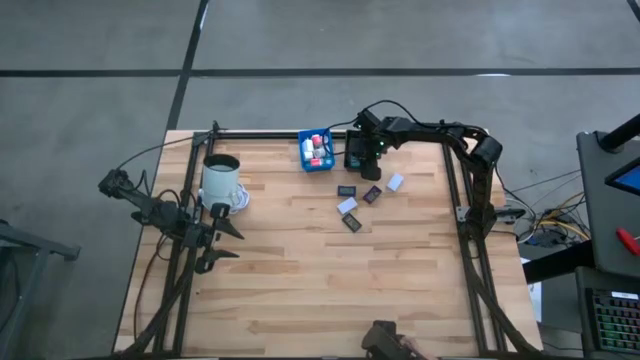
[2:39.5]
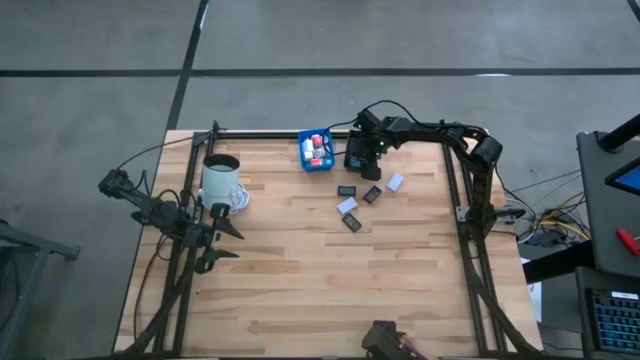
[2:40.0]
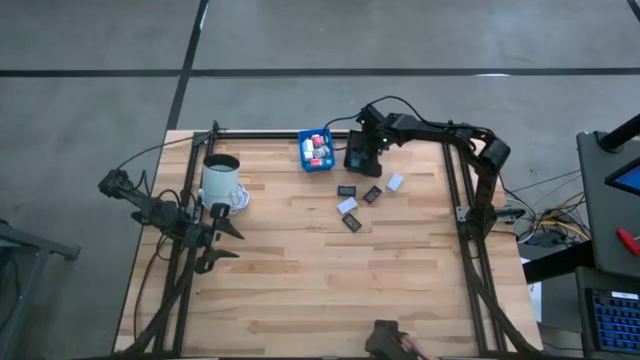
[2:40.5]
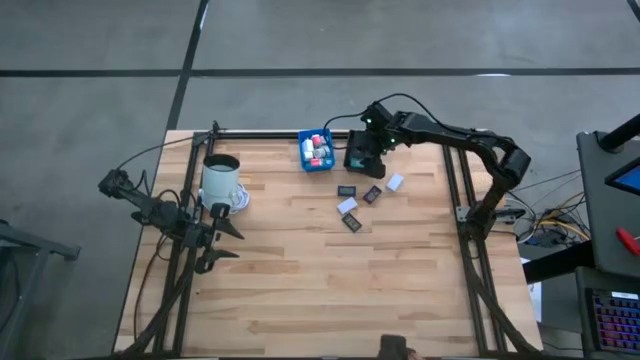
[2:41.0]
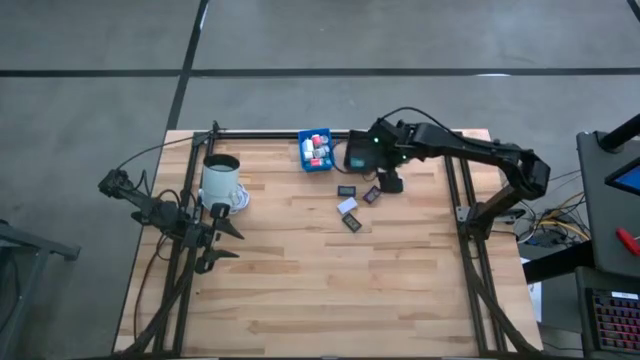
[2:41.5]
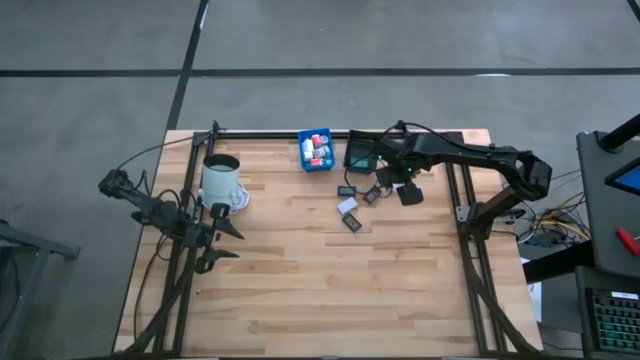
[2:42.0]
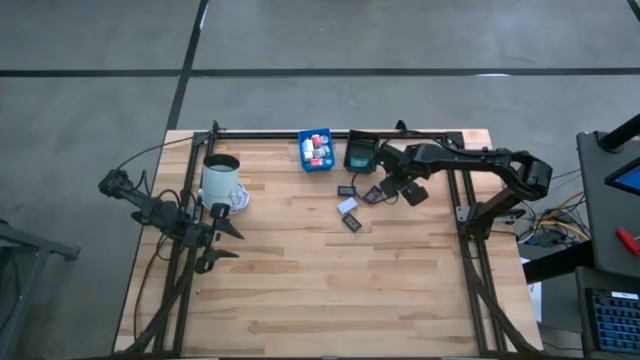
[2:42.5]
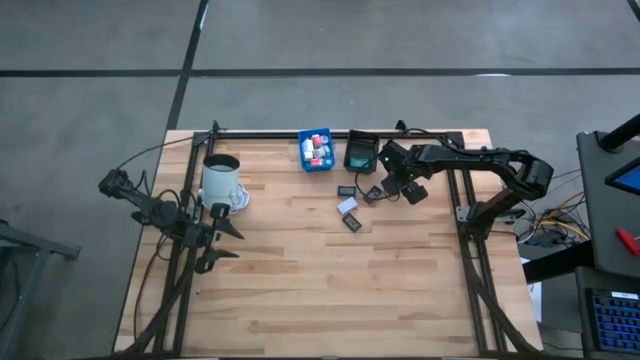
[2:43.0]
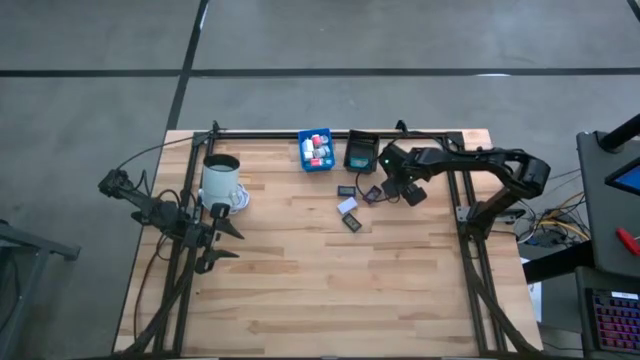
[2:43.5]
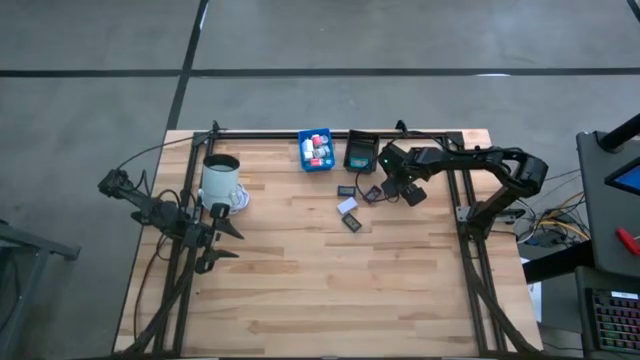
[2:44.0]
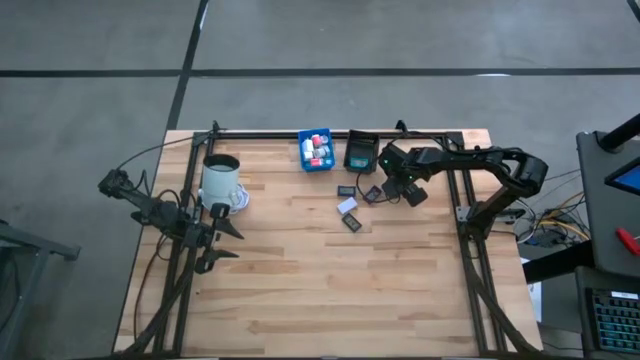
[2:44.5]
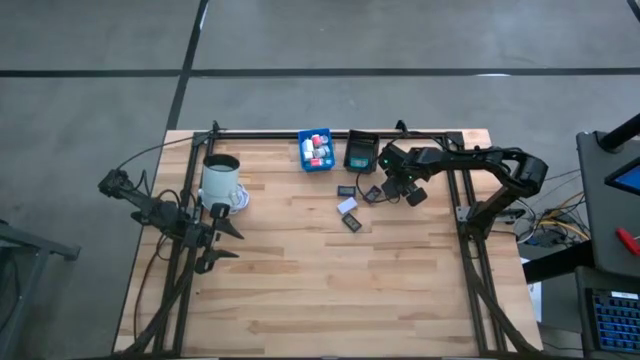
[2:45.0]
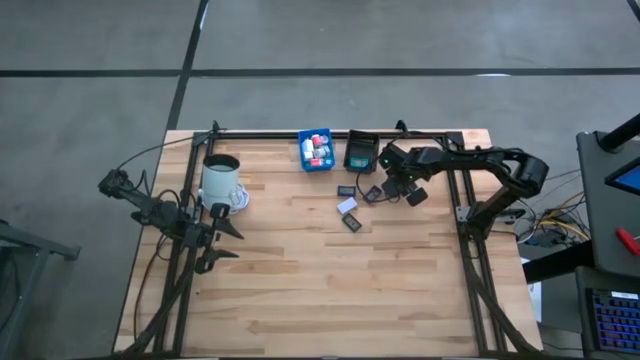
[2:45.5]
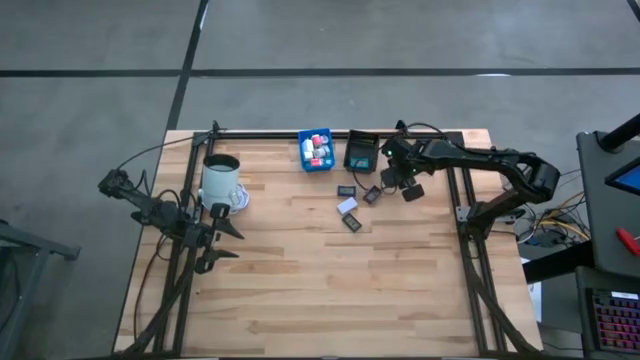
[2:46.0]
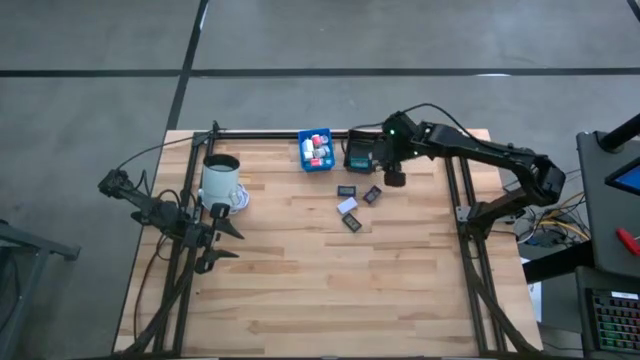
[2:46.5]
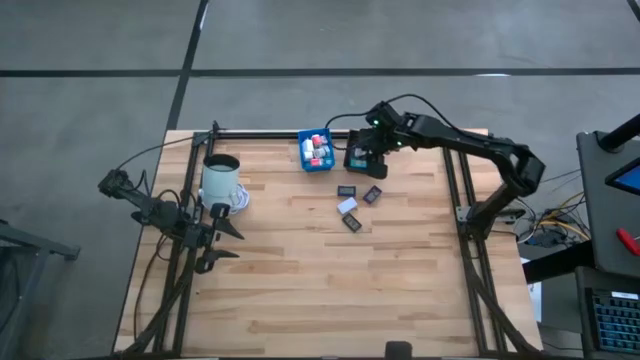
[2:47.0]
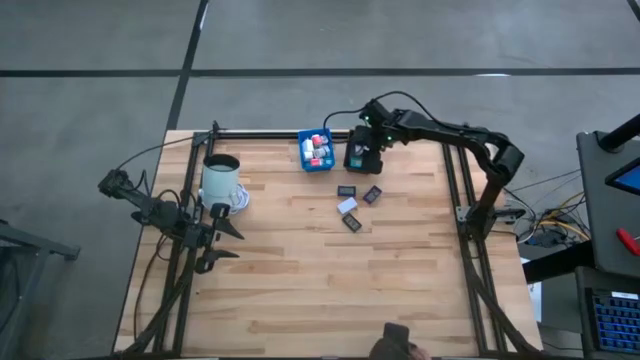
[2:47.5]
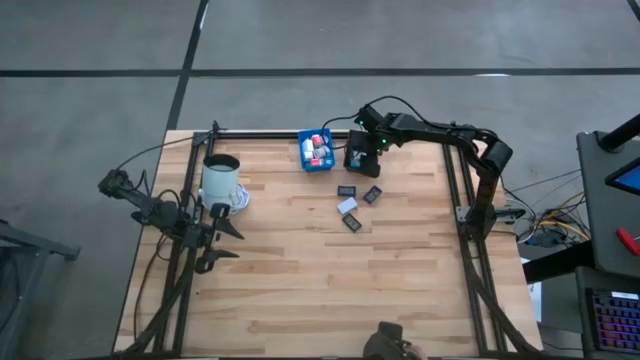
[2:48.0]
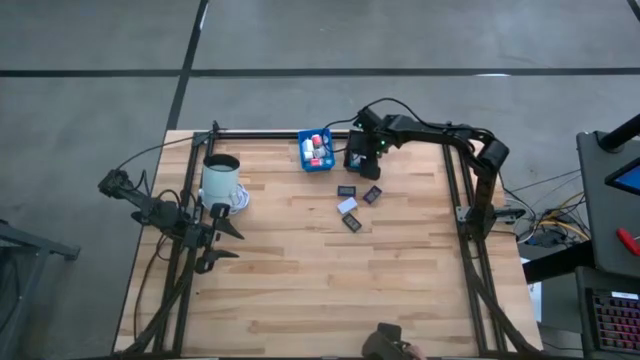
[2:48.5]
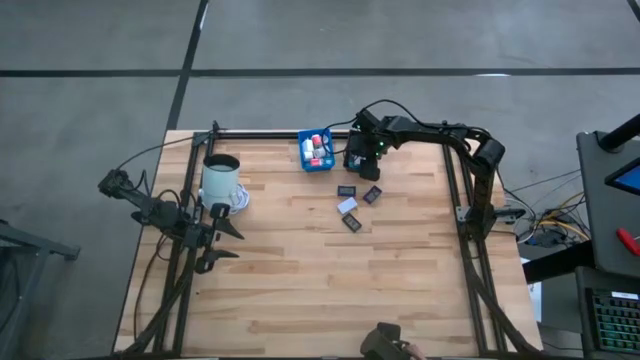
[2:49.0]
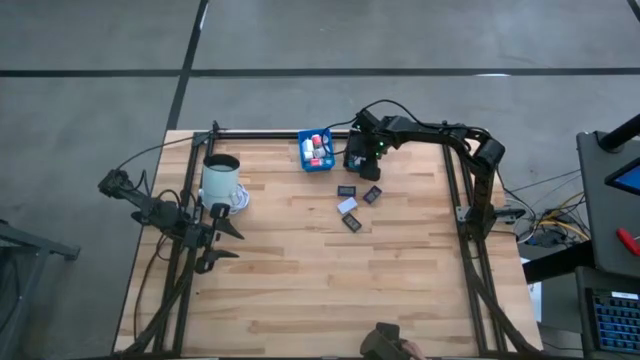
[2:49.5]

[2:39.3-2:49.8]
Task: Pick & Place Office items
Put the right white digital clock into the black basket

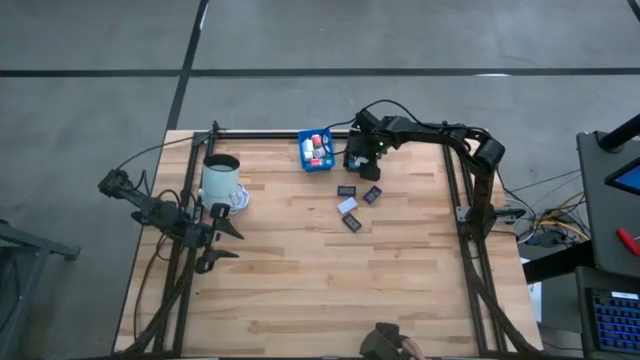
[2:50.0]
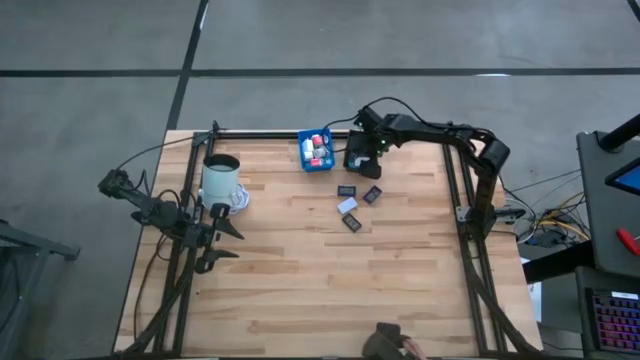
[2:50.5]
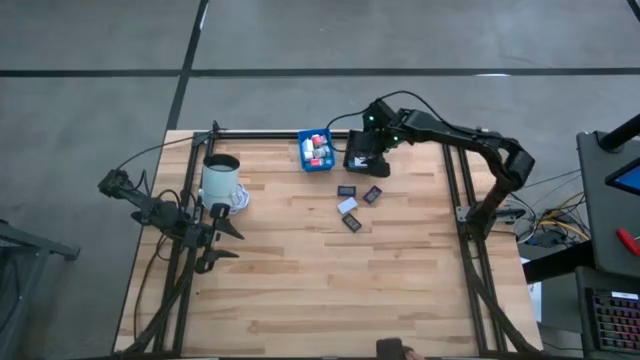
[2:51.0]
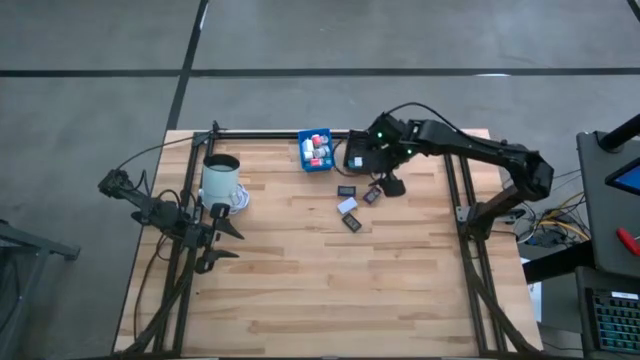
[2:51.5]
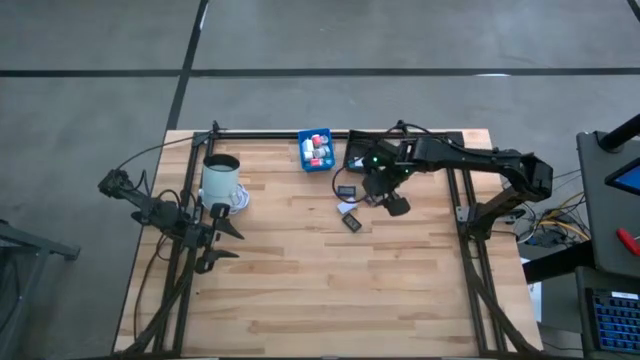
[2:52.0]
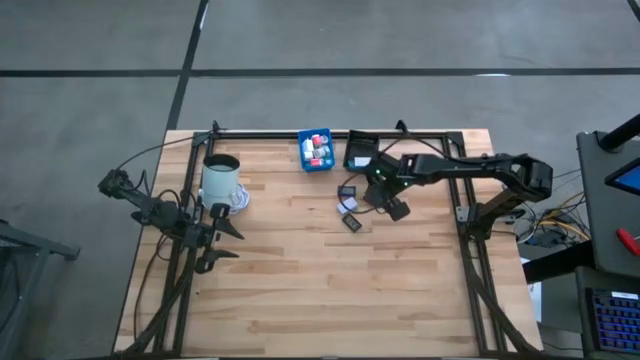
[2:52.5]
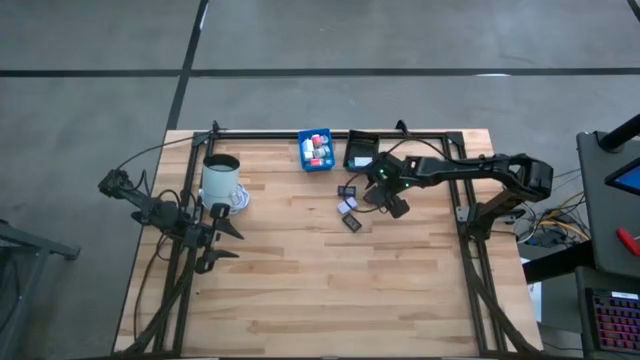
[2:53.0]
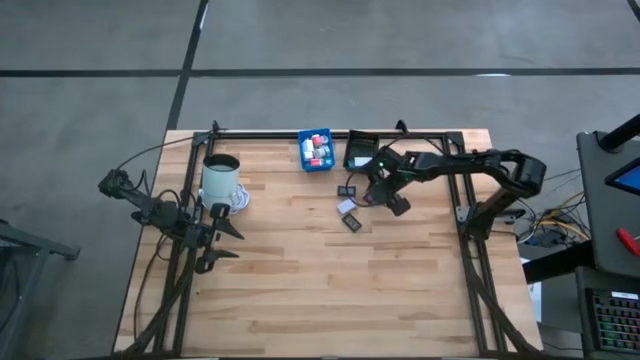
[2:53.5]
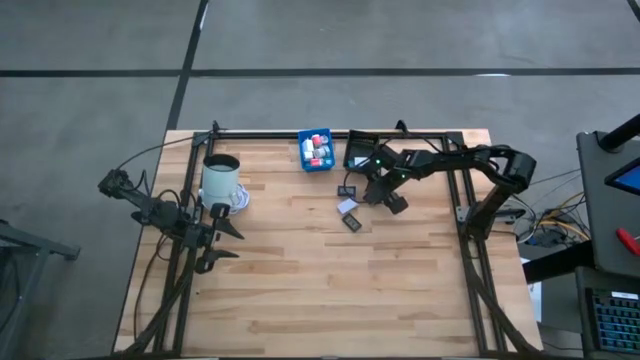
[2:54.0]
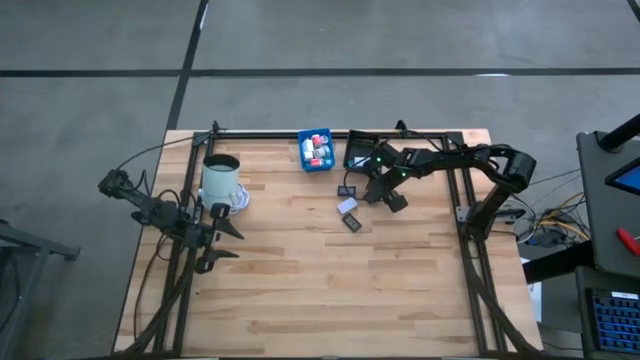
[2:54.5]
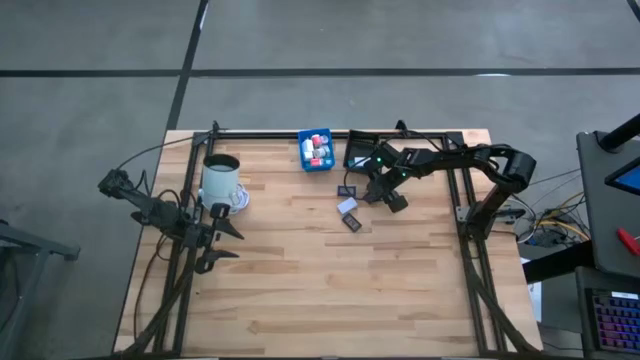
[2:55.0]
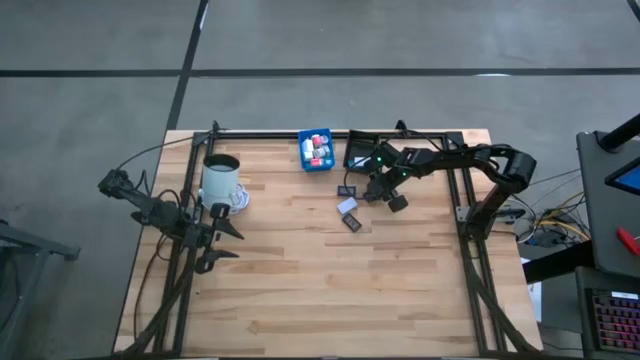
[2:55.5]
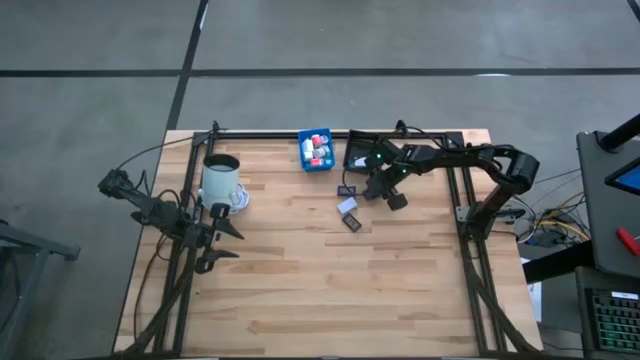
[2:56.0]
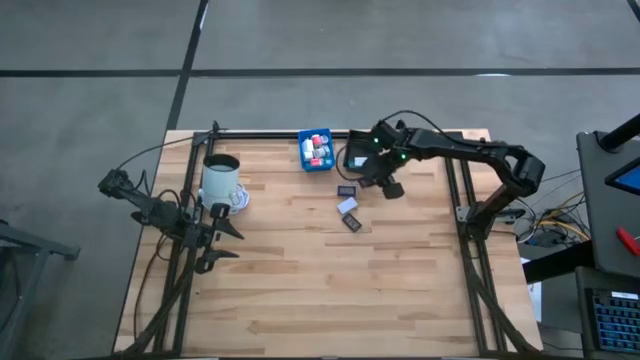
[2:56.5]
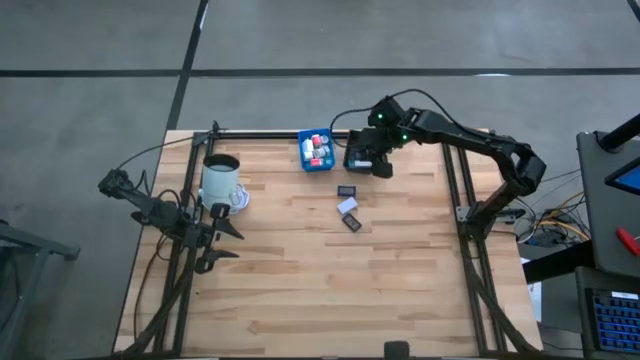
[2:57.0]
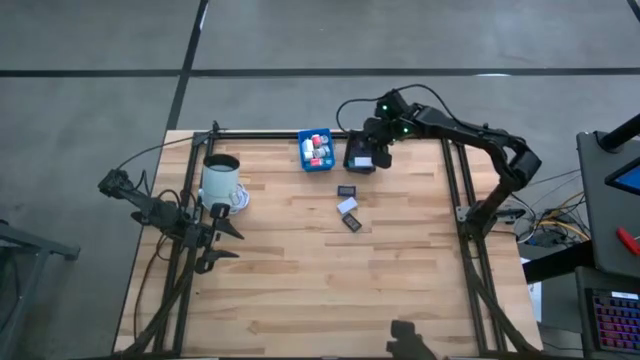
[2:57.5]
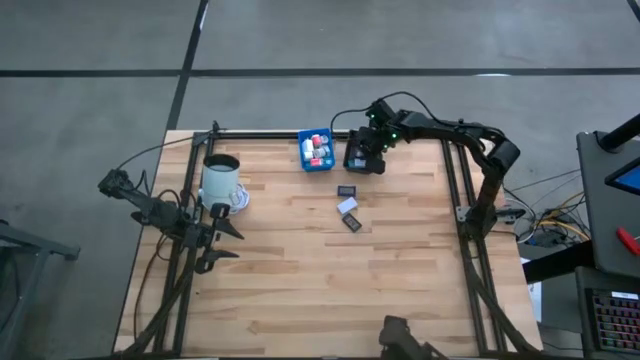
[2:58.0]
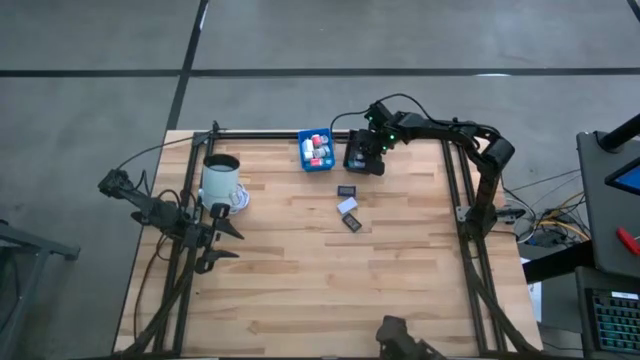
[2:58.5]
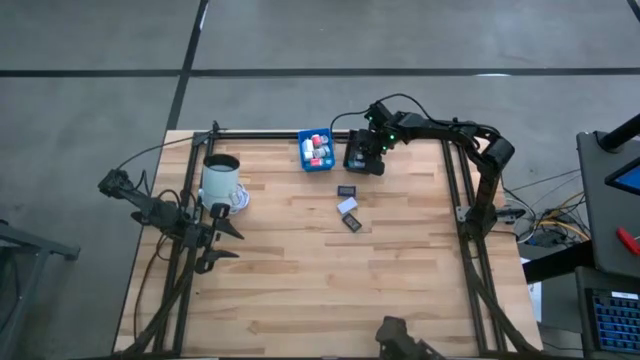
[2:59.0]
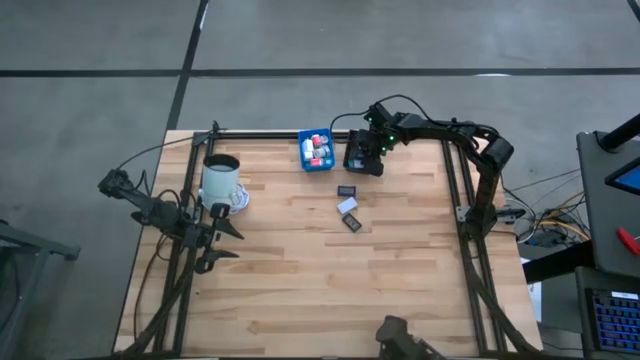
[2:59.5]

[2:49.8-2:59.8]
Put the right purple digital clock into the black basket
